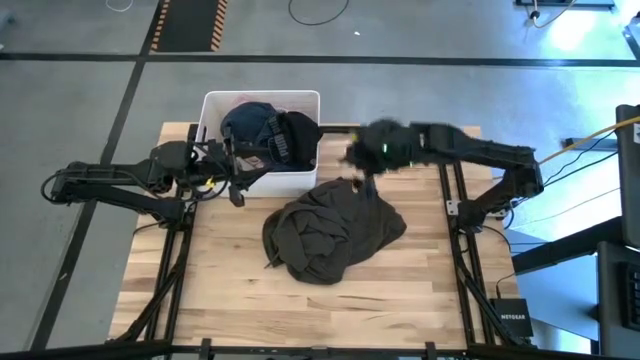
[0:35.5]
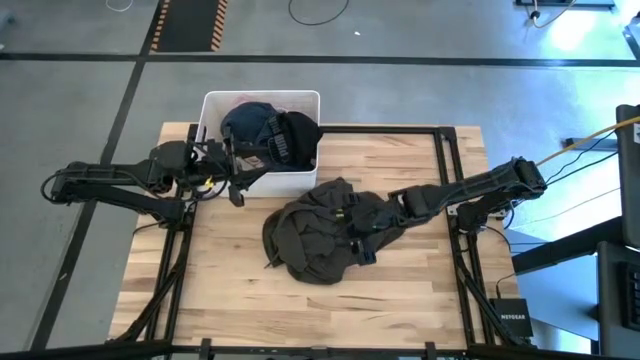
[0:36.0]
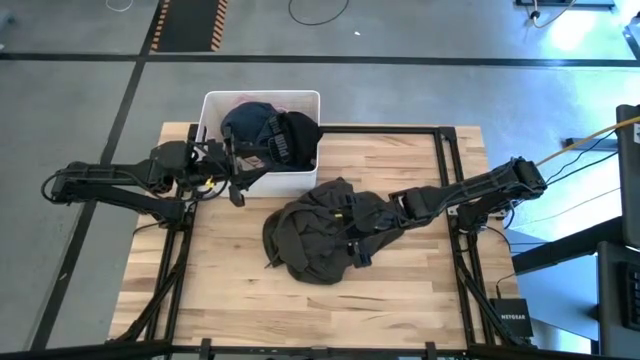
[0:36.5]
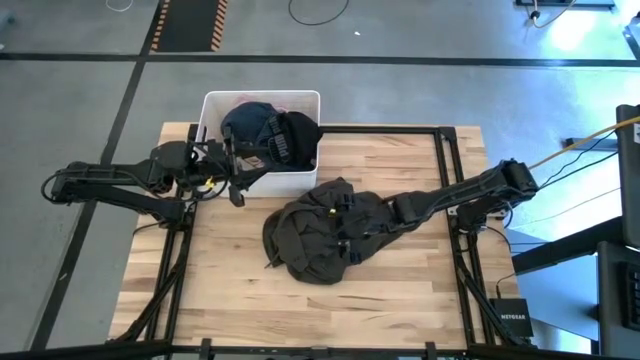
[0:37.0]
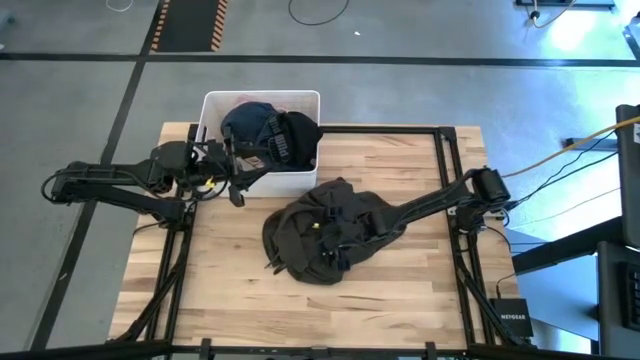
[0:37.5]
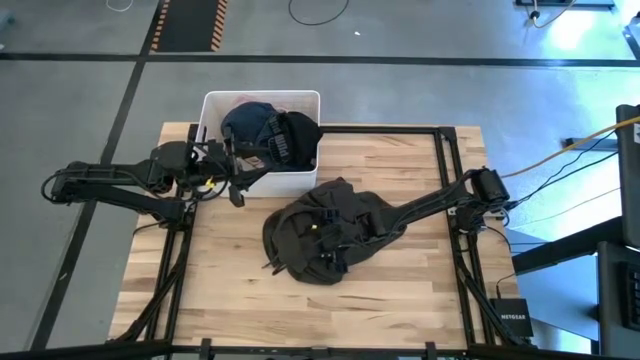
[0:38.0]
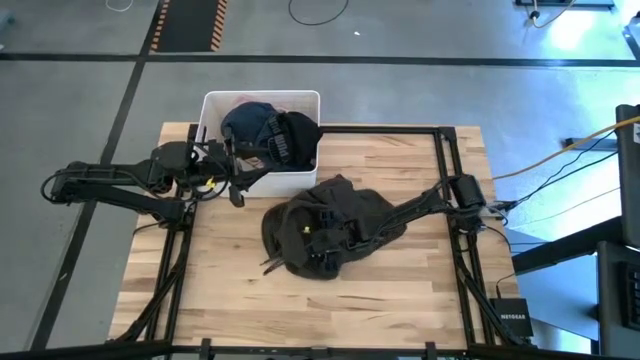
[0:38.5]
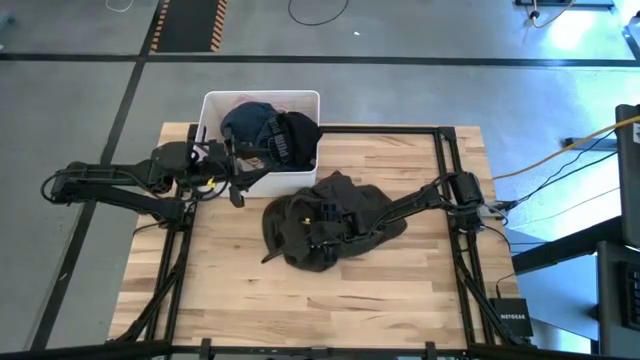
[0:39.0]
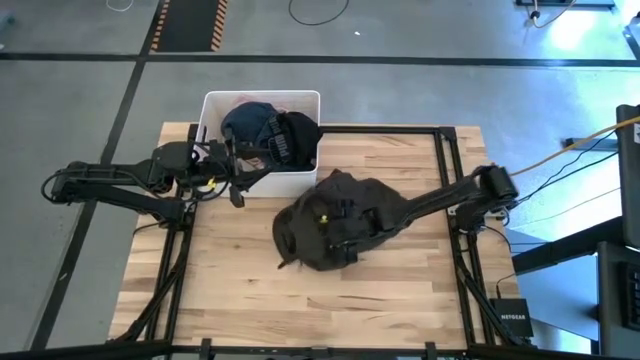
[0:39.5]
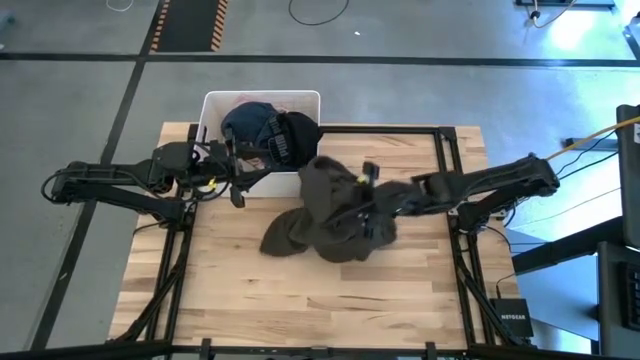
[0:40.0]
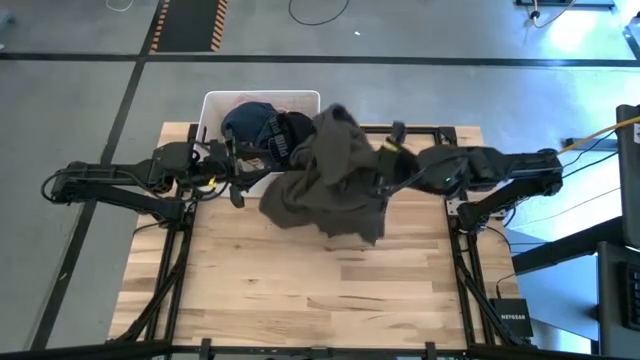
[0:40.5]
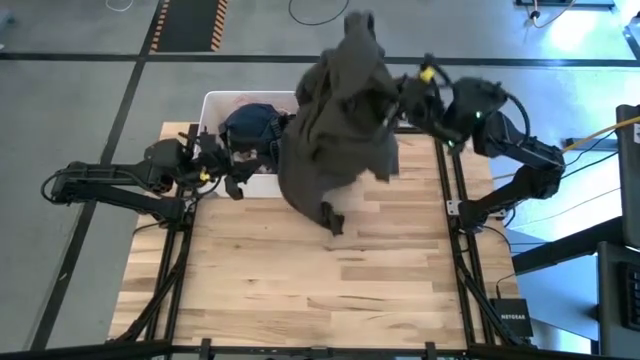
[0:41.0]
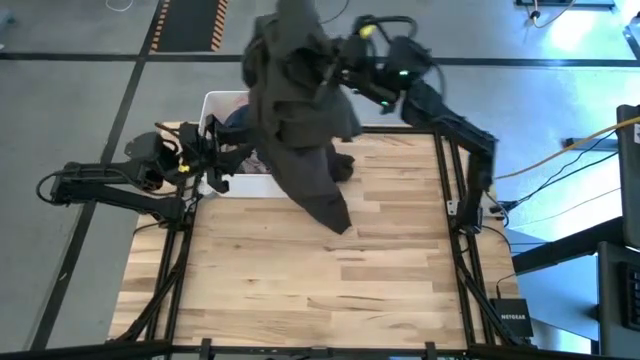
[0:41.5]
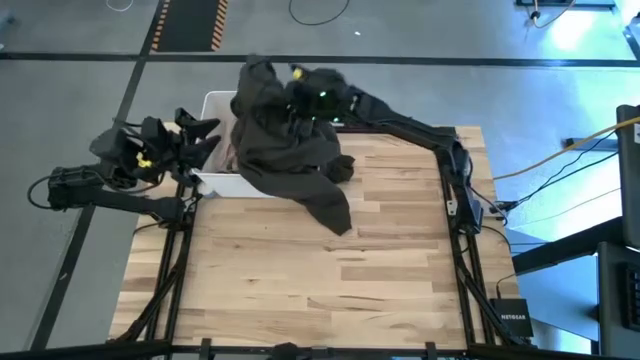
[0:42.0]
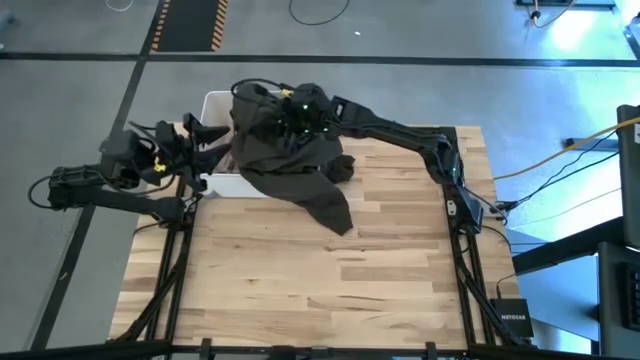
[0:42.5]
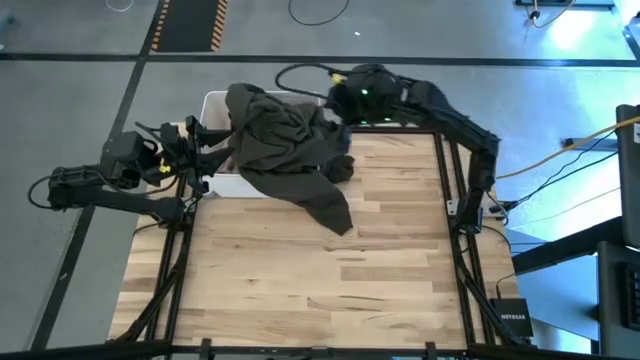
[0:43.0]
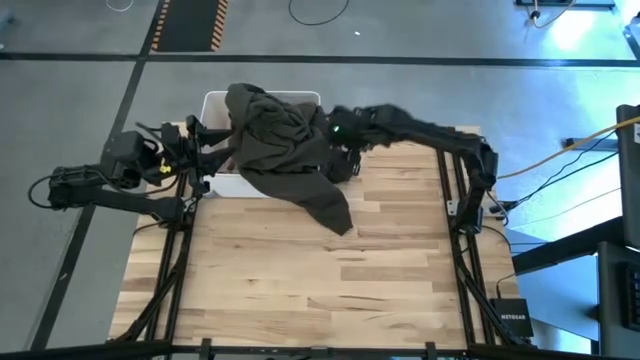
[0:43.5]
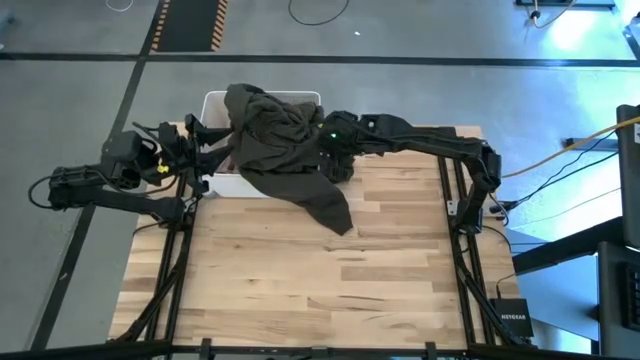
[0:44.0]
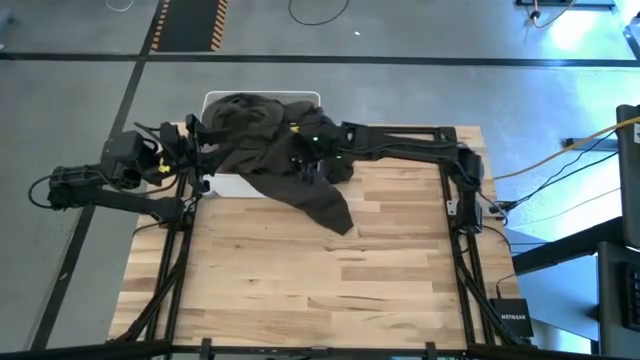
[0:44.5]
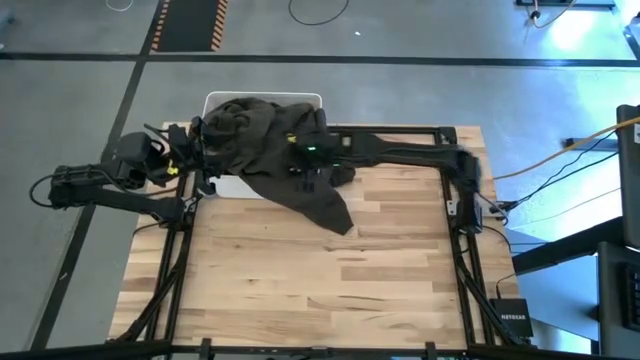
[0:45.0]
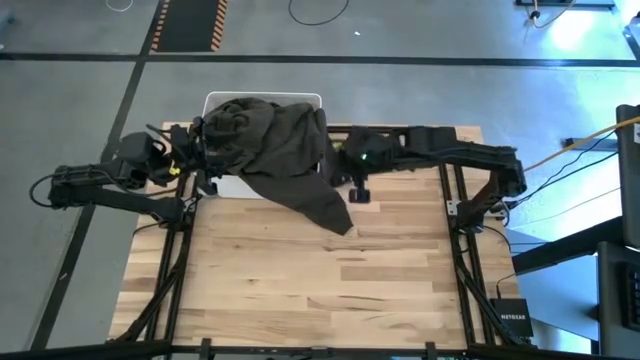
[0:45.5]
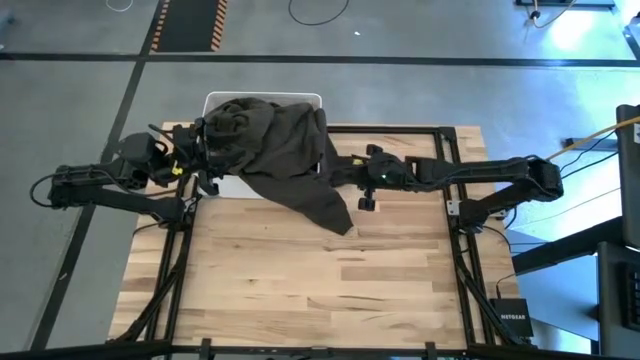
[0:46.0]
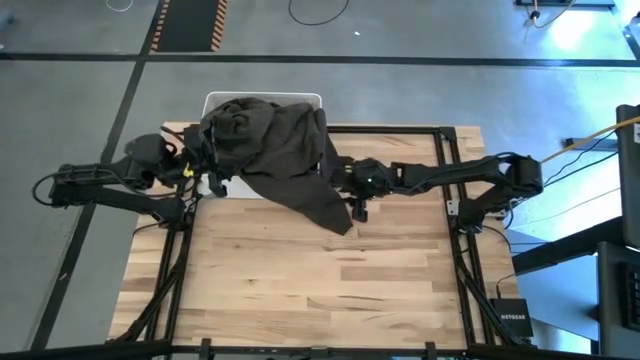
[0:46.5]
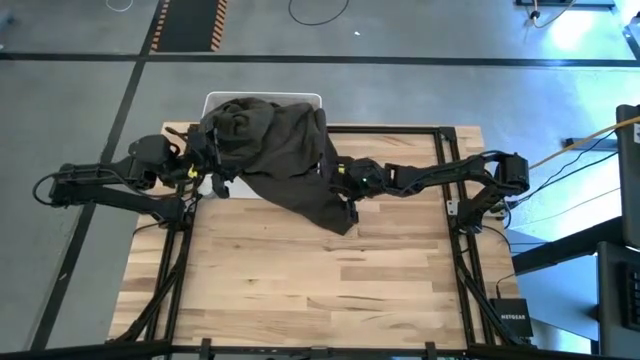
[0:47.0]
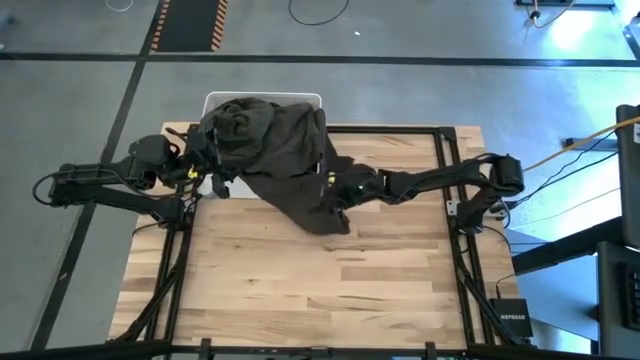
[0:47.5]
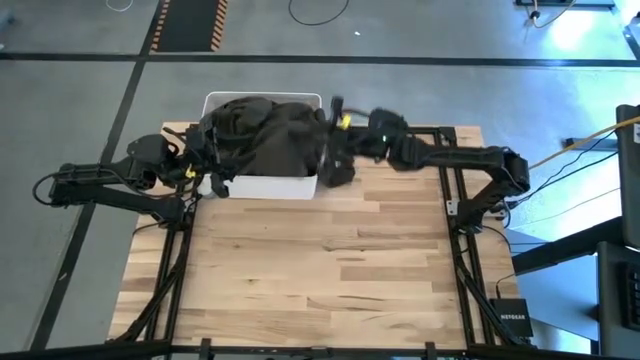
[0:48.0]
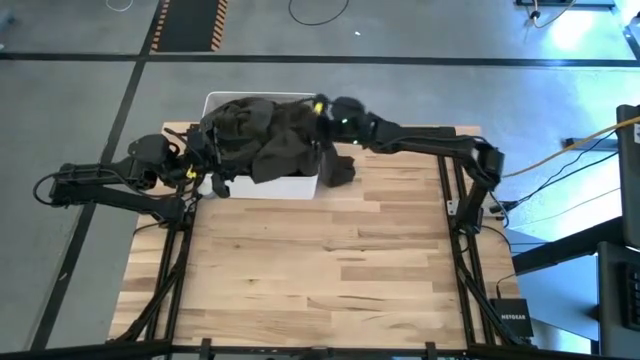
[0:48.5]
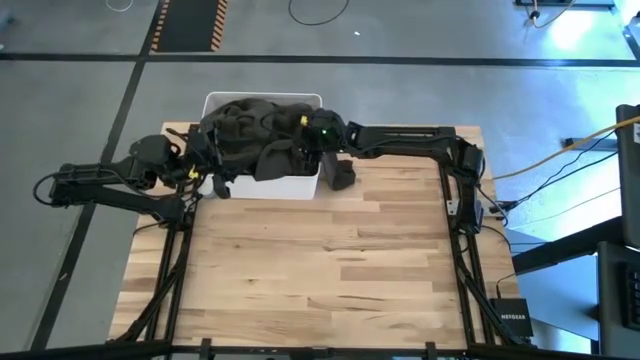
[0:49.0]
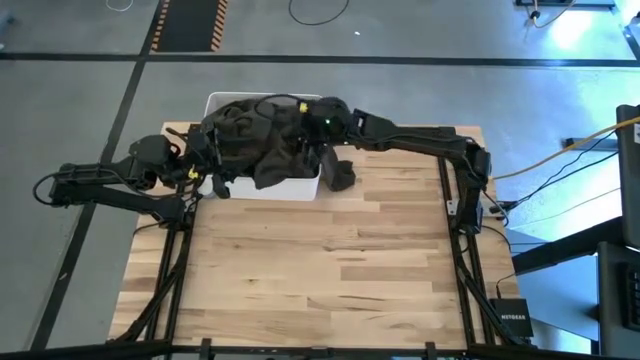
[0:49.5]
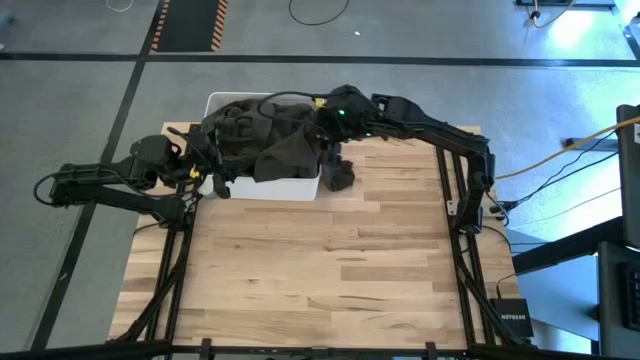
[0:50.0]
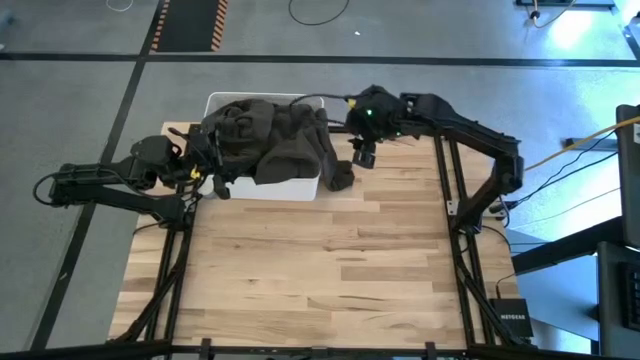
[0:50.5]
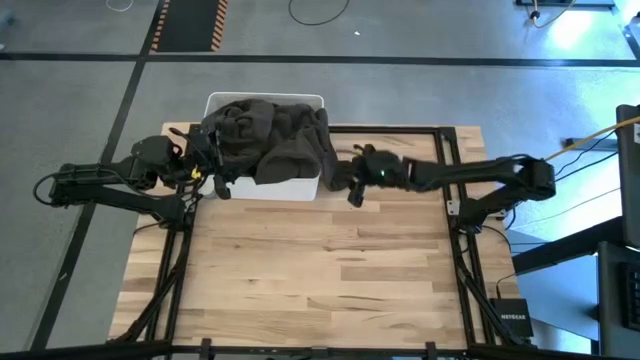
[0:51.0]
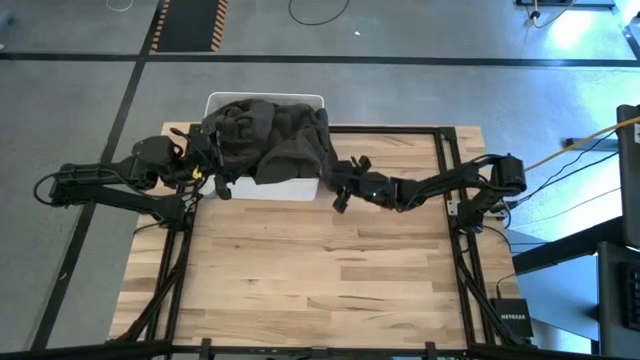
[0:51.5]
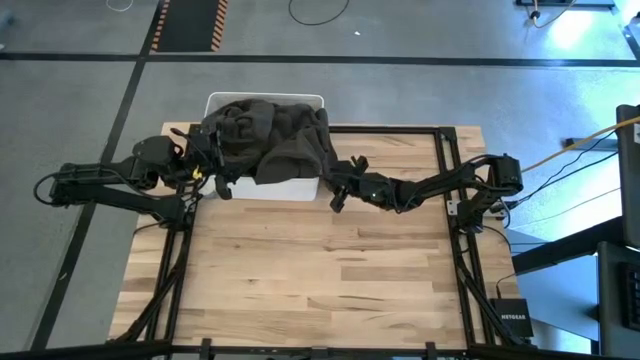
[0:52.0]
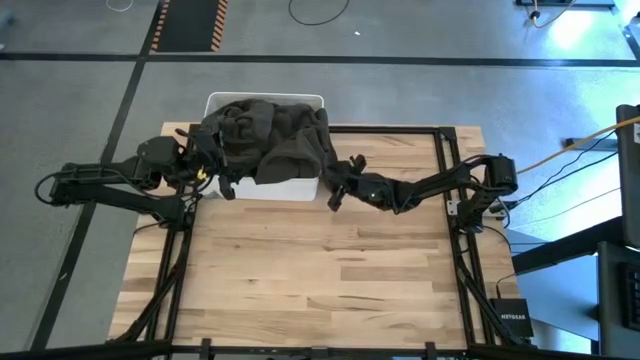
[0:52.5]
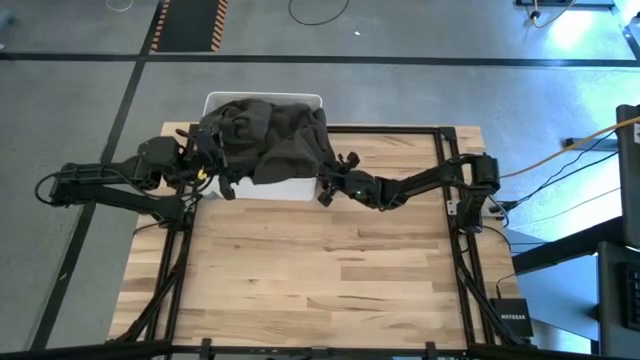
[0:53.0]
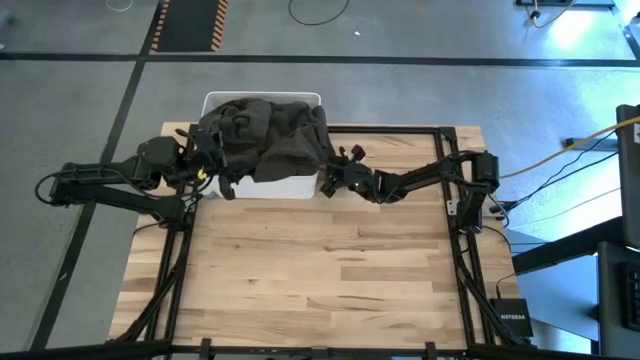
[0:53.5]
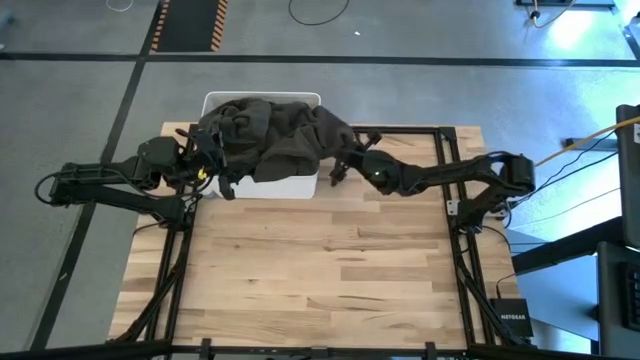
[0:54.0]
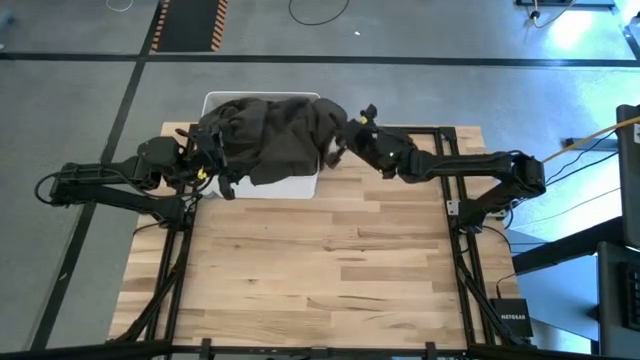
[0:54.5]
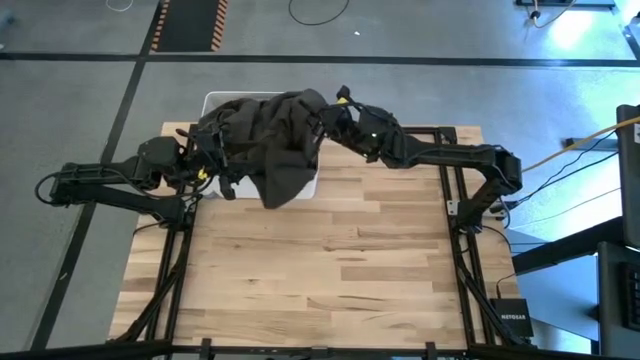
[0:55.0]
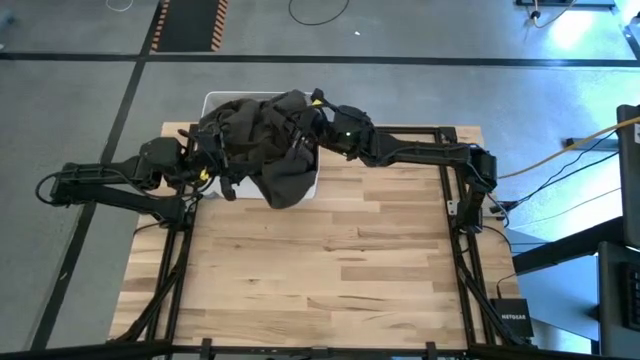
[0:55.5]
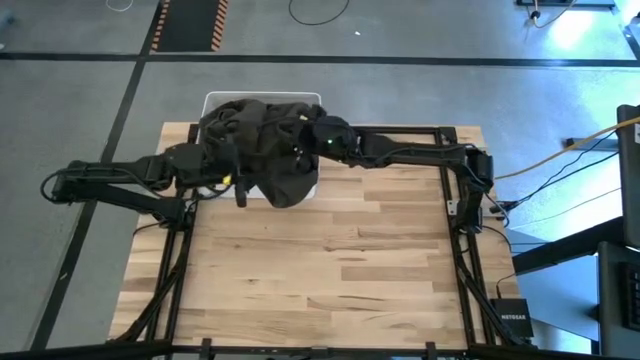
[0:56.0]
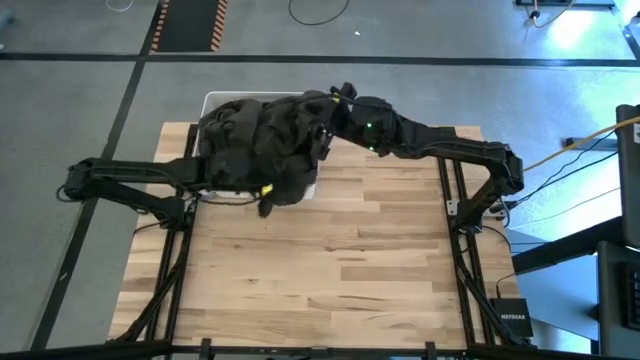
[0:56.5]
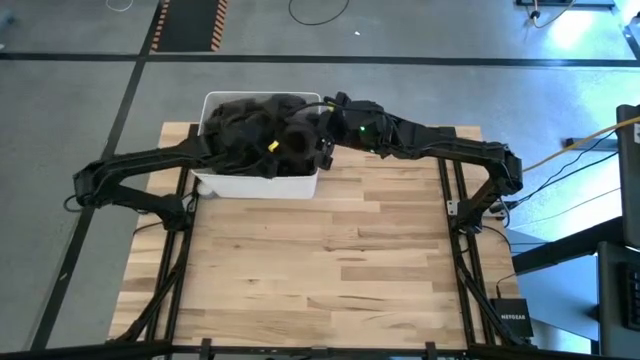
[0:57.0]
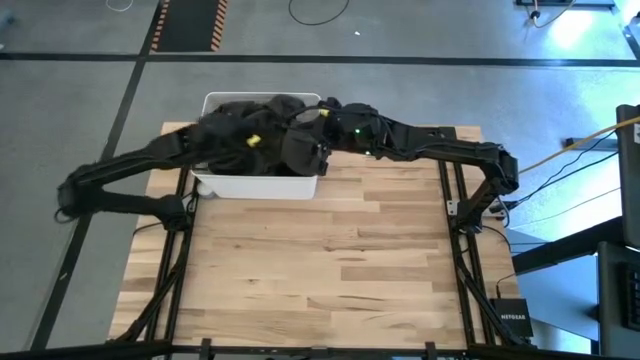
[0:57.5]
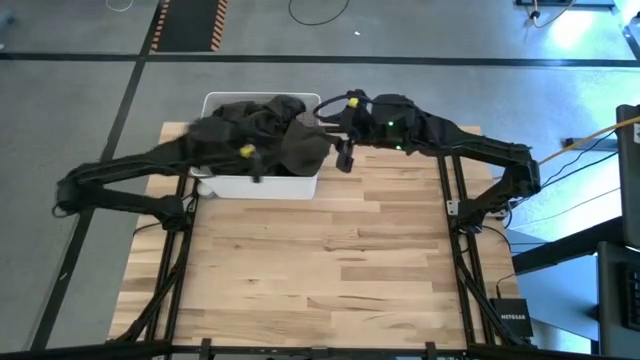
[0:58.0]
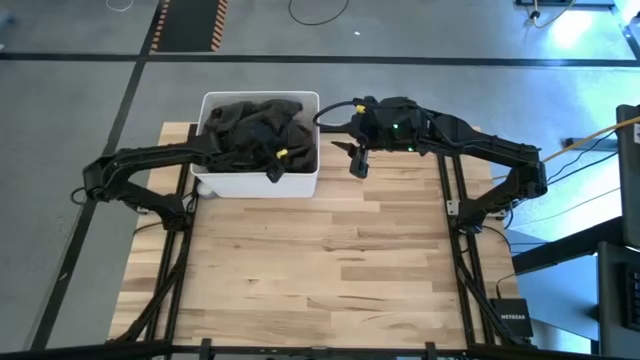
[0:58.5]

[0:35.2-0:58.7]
Task: Sort clothes
Put the black shirt into the bin
